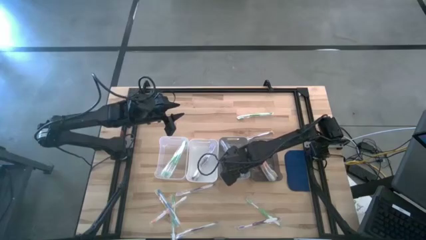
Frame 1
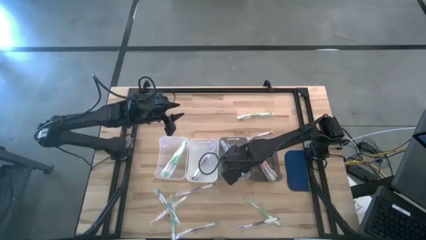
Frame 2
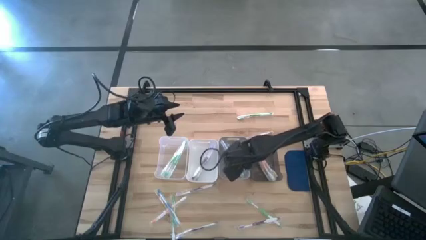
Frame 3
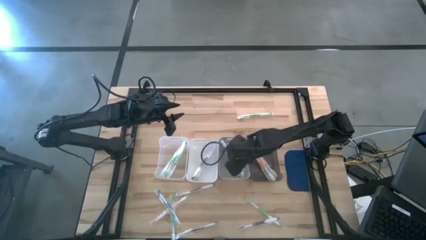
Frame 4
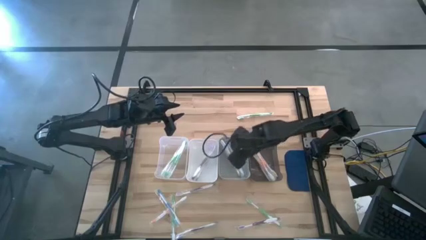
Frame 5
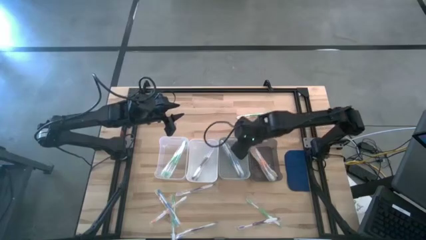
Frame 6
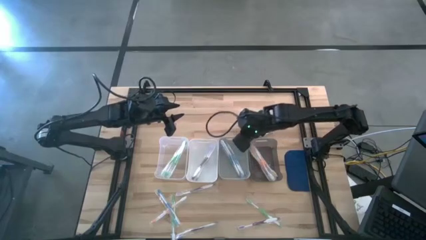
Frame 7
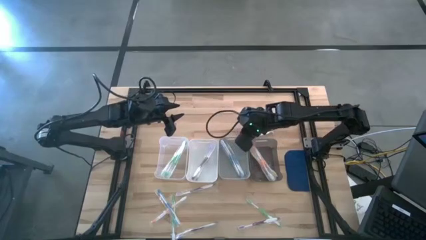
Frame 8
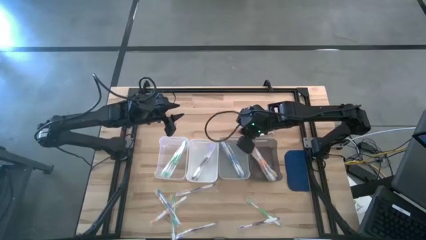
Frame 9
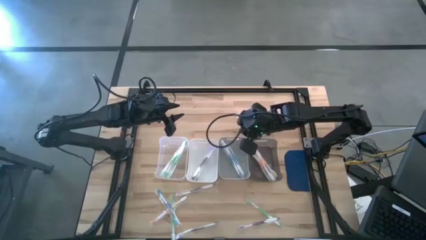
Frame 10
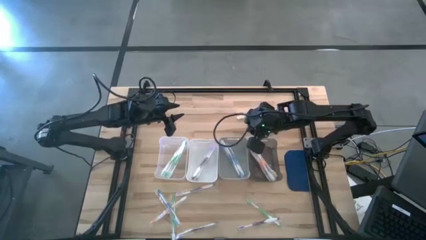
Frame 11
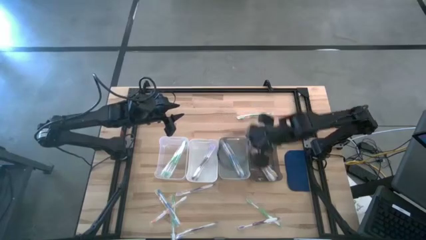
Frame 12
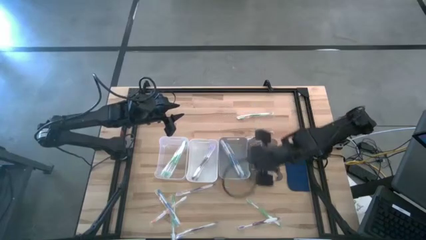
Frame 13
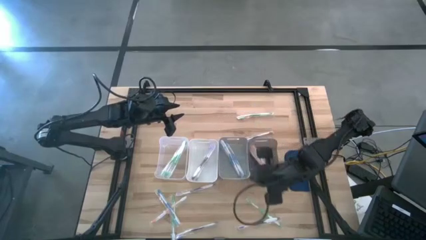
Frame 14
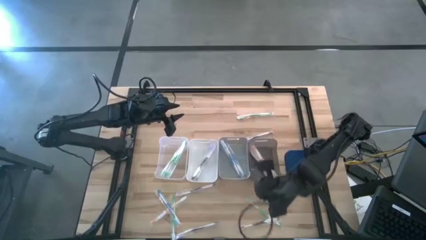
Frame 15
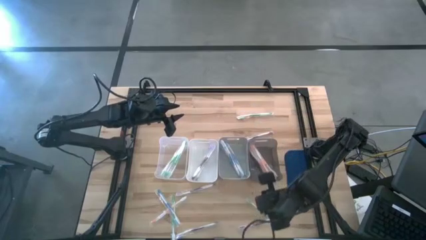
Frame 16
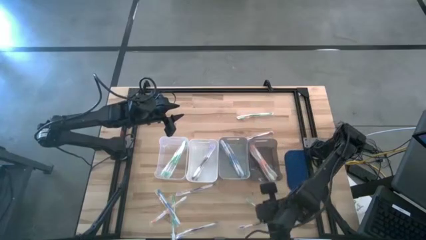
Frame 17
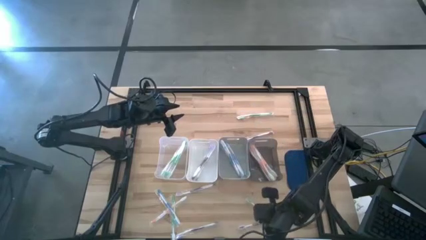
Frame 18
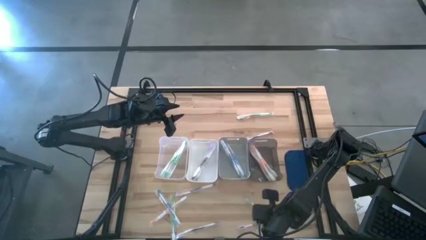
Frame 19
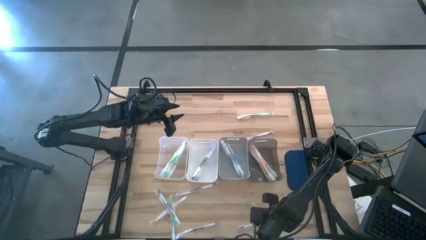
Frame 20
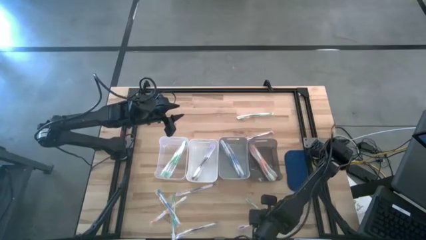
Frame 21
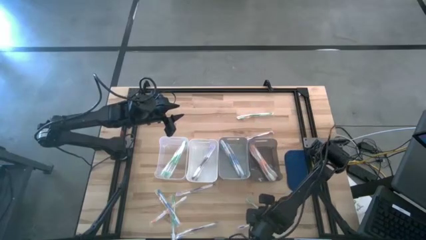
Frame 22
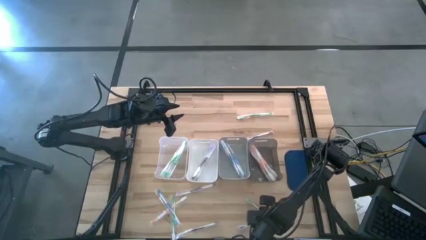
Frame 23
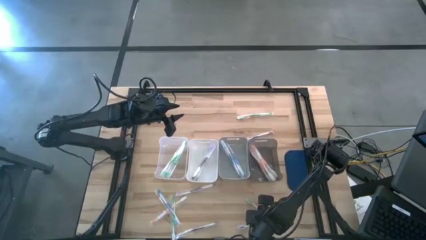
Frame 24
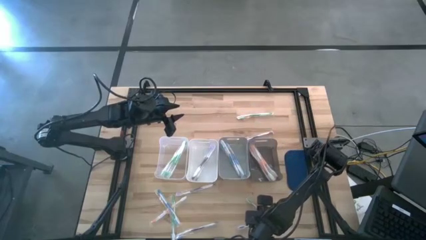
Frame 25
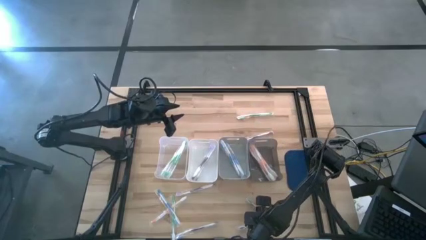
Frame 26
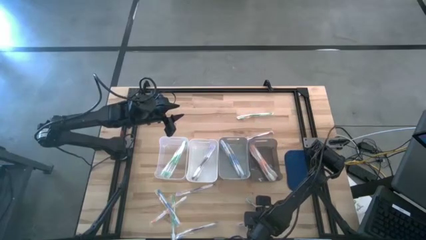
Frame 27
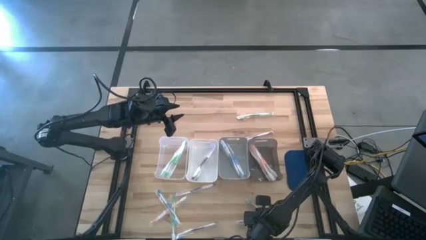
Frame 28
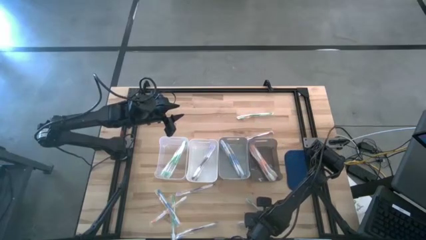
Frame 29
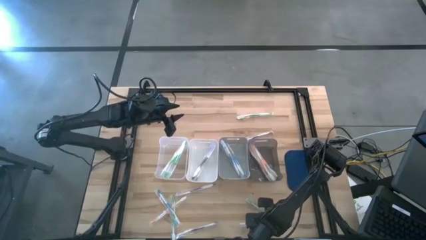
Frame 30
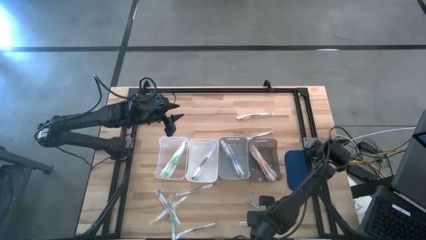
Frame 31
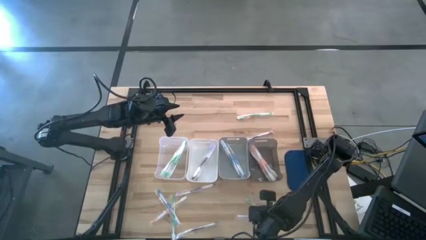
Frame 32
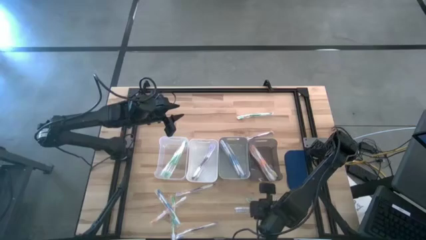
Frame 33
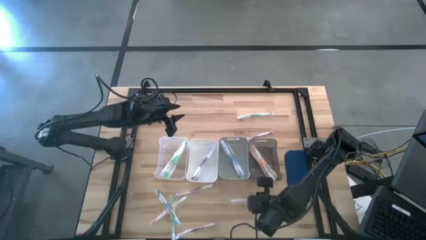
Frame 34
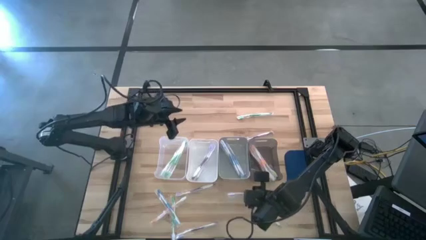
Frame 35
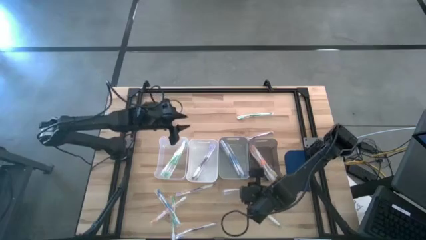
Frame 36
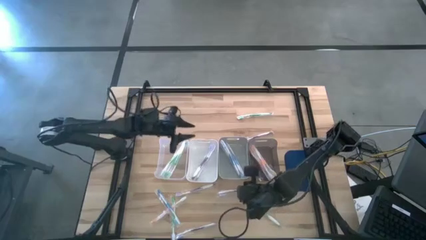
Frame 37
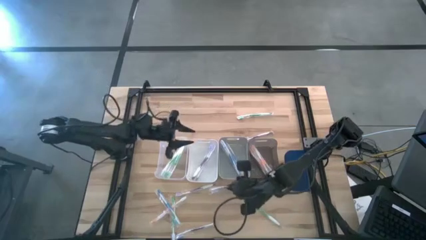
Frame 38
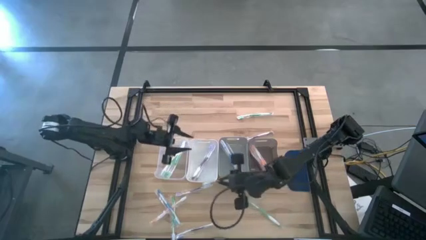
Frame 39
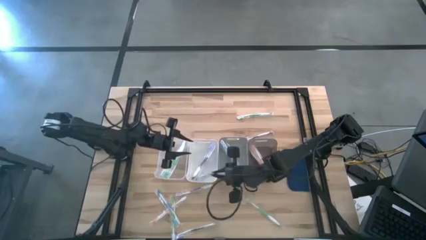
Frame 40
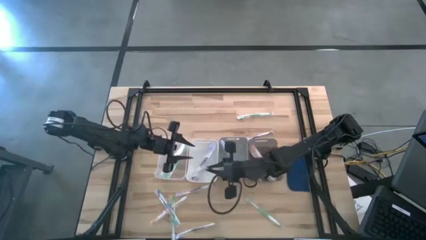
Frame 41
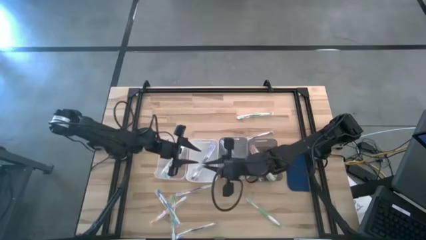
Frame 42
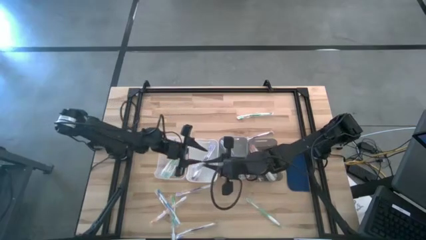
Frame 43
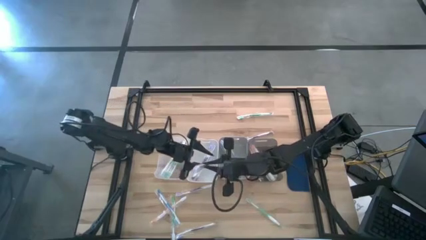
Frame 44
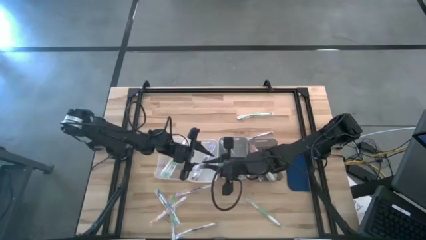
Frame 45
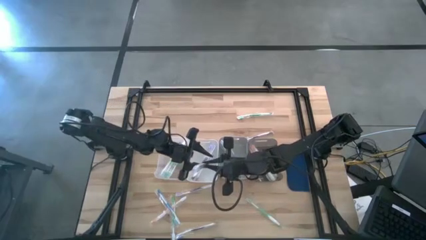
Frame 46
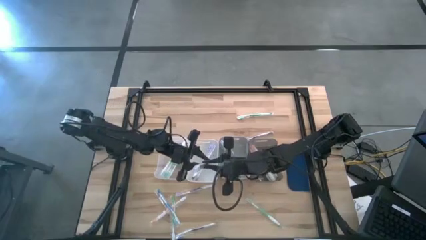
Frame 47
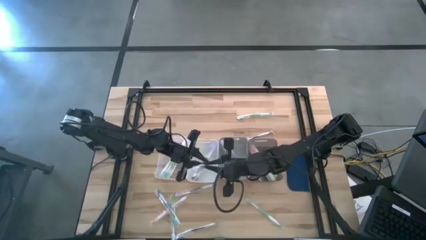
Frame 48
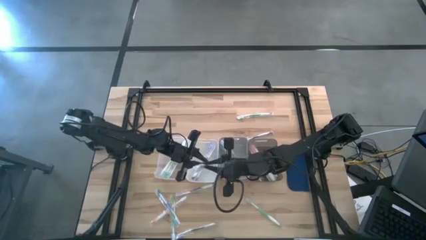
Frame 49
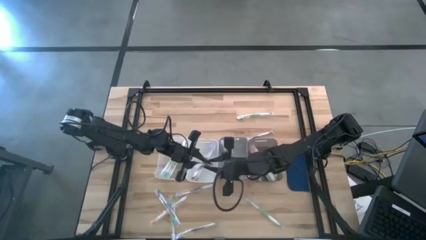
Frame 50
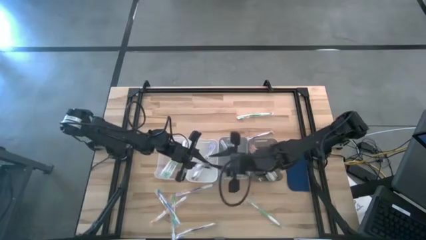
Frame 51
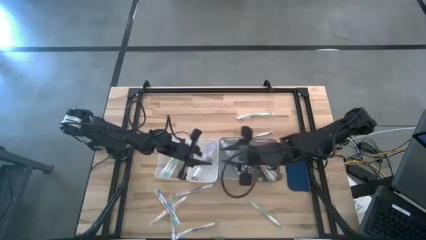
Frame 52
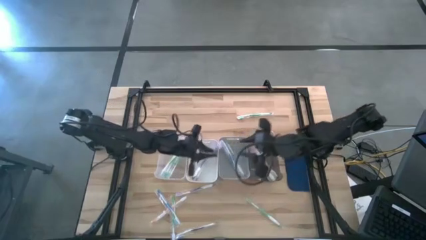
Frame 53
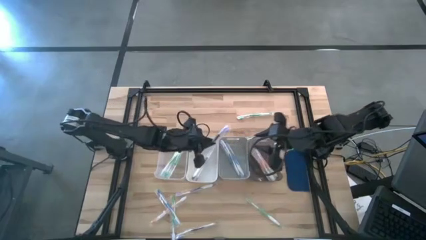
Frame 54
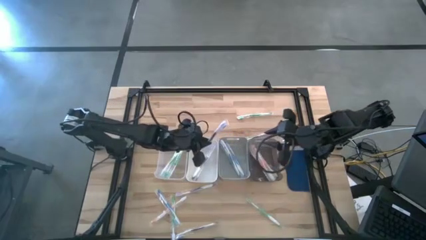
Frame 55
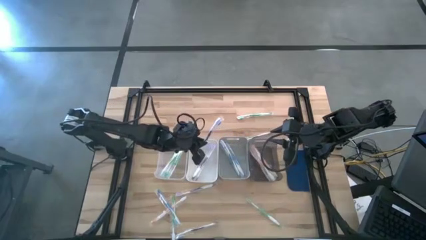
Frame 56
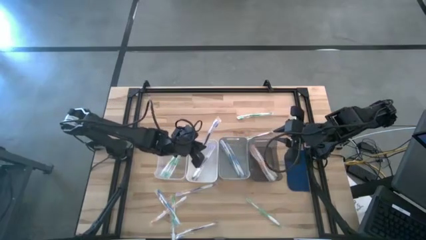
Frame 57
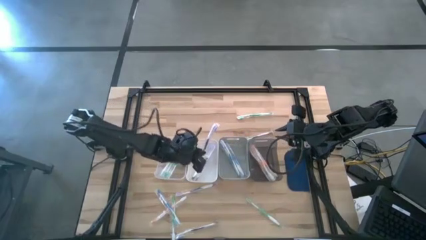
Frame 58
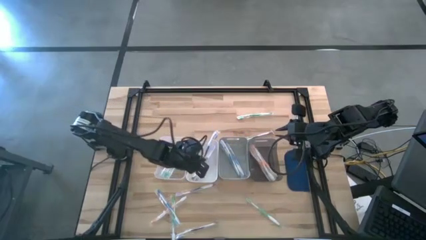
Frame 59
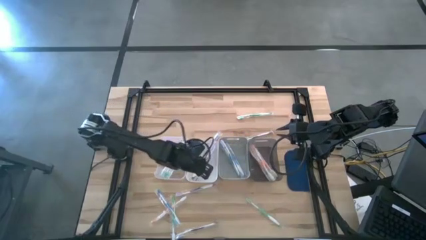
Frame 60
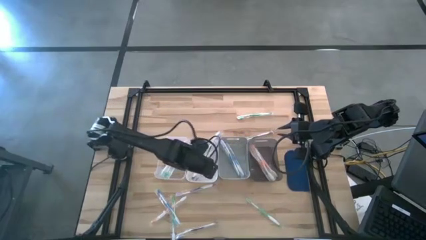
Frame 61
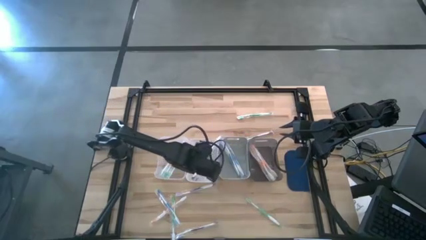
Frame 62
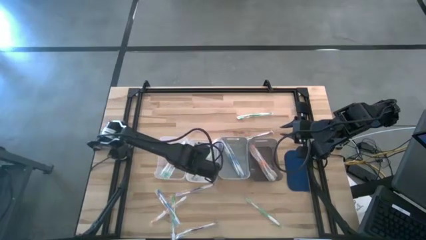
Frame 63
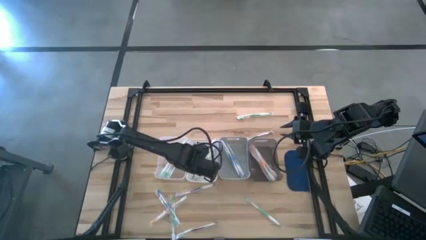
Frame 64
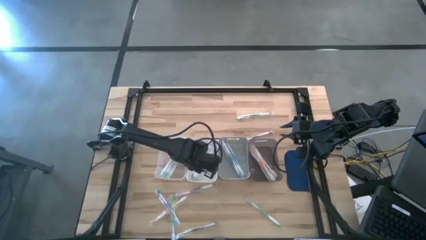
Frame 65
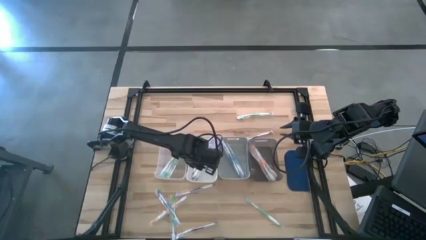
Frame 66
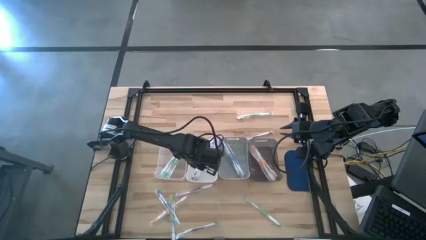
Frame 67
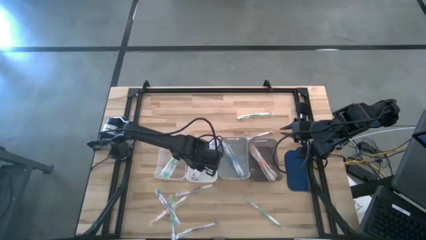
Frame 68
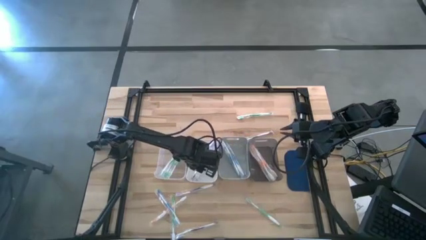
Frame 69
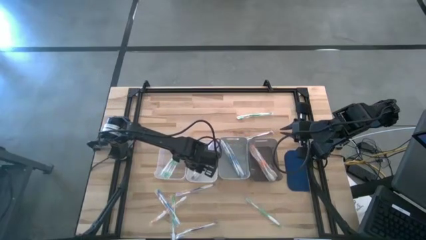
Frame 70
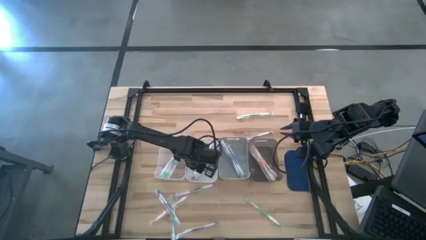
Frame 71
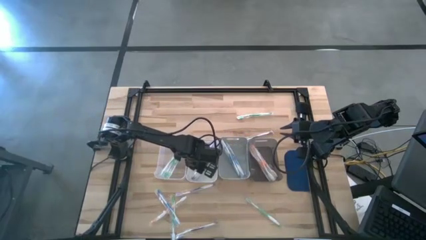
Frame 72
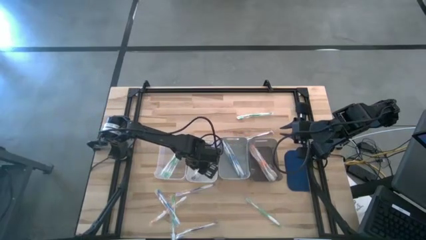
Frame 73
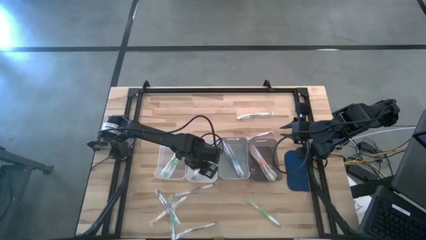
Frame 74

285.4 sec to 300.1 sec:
Task: Pick & Place Toothbrushes
Put the purple toothbrush into the white bin
